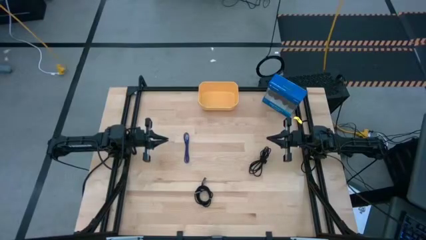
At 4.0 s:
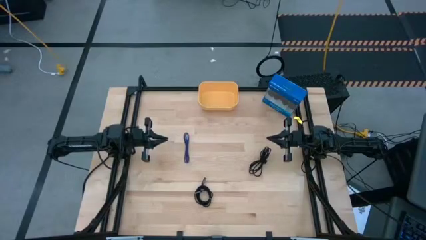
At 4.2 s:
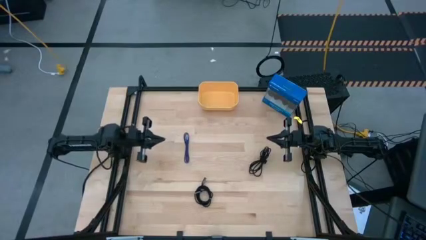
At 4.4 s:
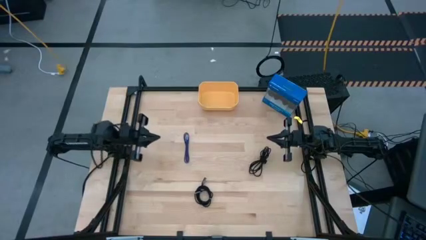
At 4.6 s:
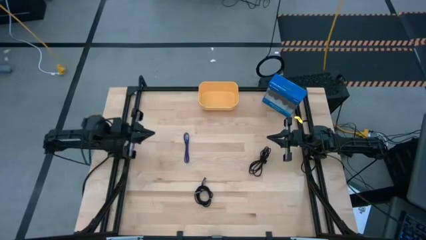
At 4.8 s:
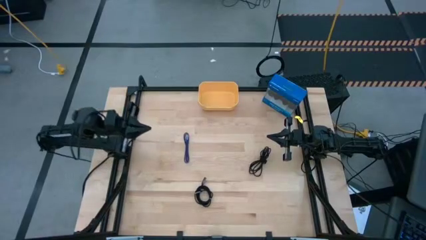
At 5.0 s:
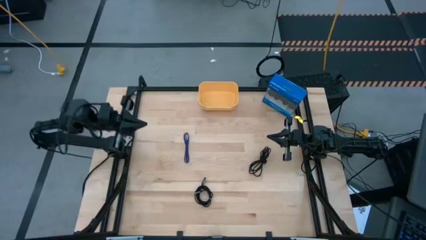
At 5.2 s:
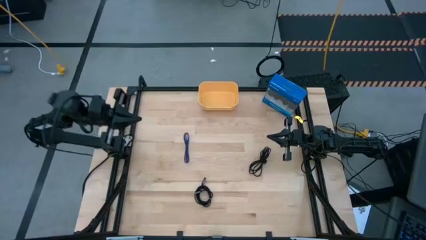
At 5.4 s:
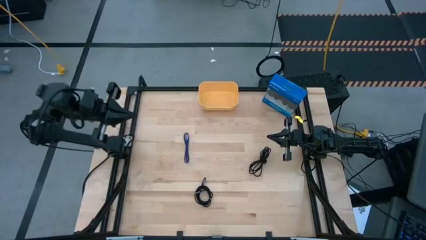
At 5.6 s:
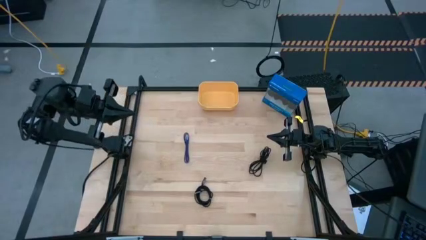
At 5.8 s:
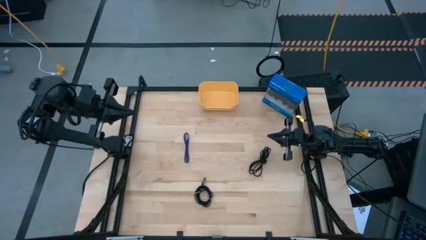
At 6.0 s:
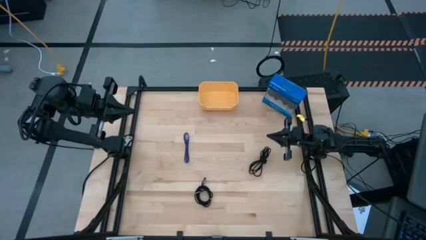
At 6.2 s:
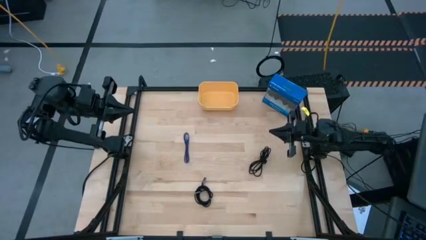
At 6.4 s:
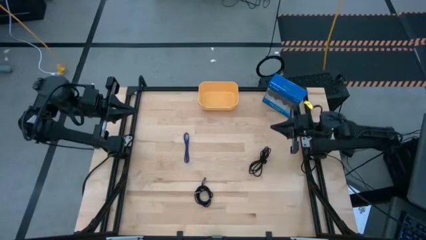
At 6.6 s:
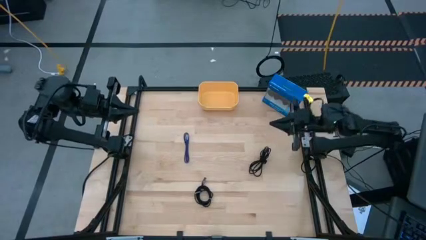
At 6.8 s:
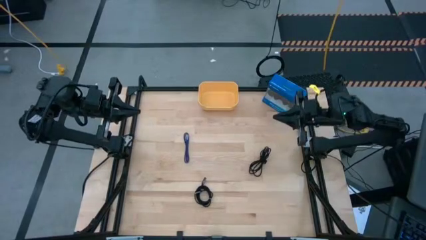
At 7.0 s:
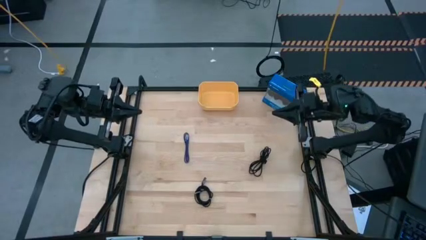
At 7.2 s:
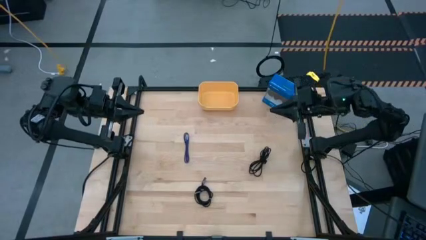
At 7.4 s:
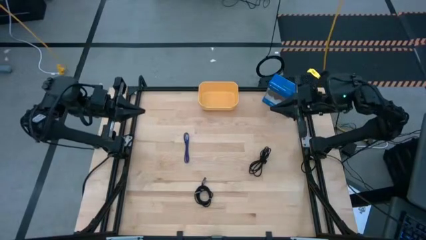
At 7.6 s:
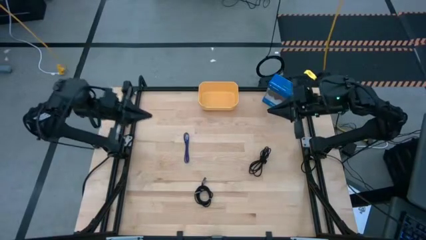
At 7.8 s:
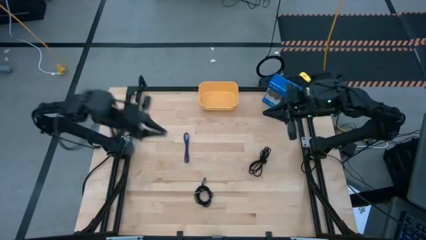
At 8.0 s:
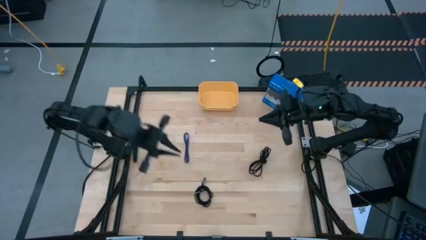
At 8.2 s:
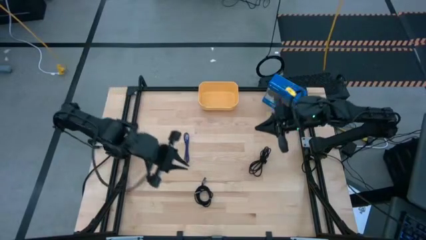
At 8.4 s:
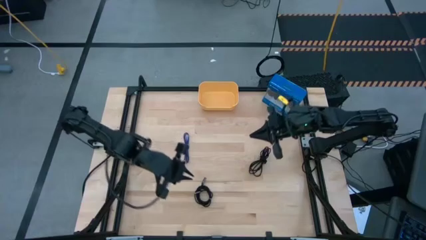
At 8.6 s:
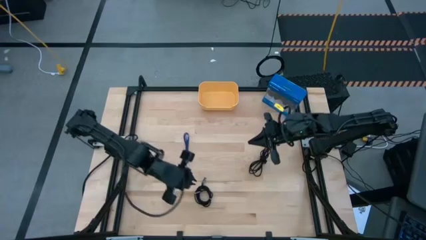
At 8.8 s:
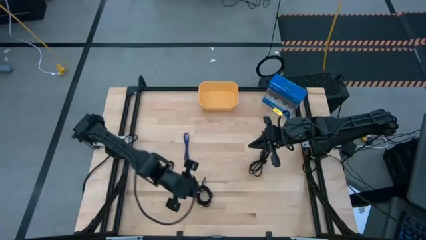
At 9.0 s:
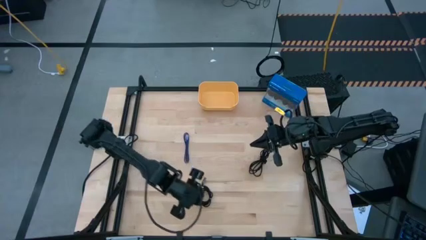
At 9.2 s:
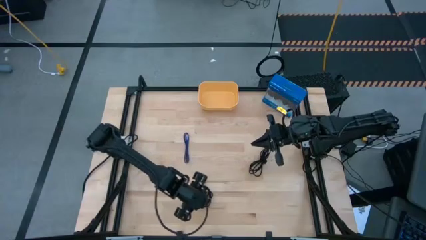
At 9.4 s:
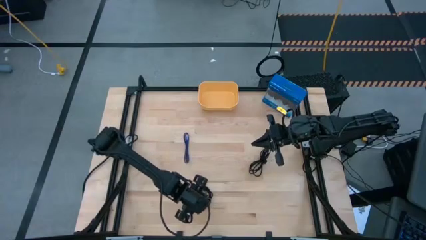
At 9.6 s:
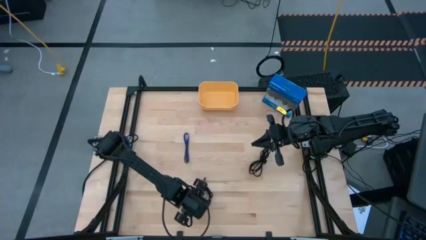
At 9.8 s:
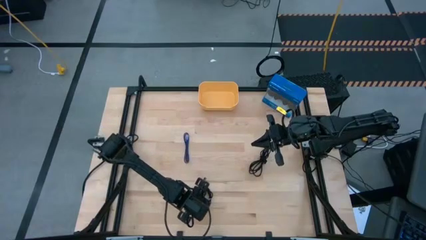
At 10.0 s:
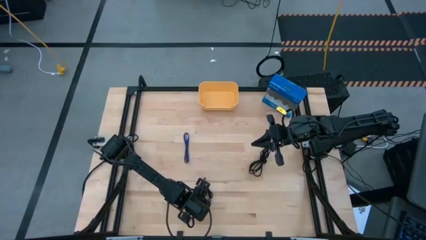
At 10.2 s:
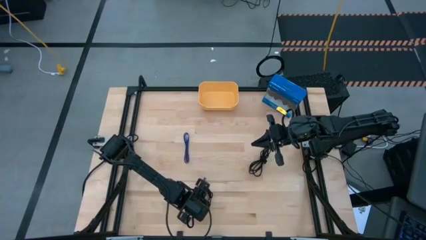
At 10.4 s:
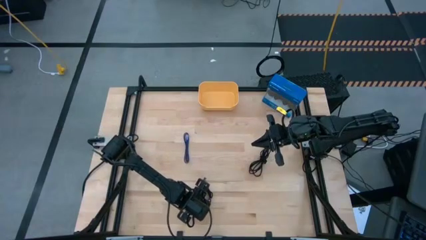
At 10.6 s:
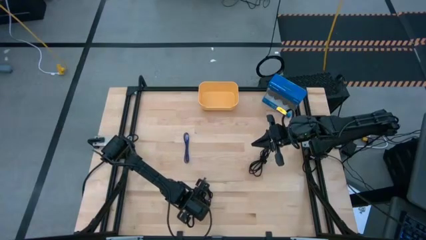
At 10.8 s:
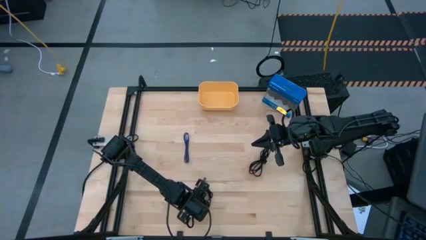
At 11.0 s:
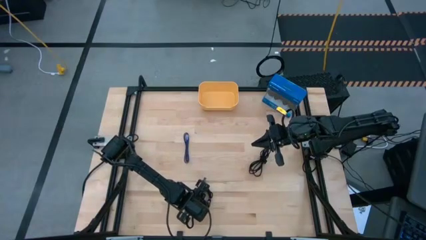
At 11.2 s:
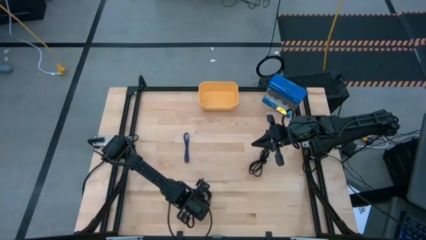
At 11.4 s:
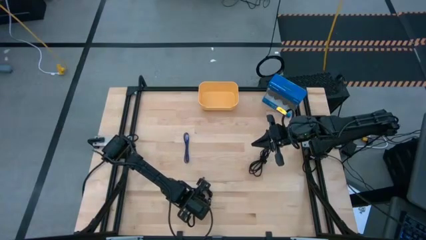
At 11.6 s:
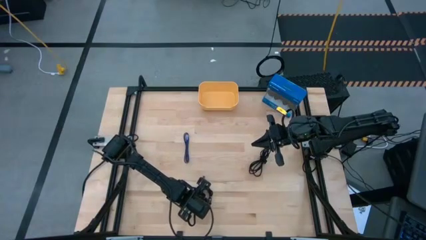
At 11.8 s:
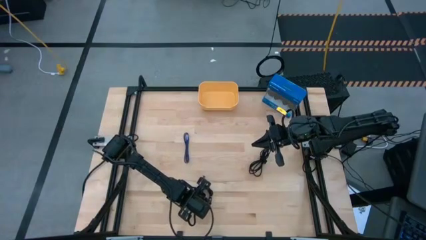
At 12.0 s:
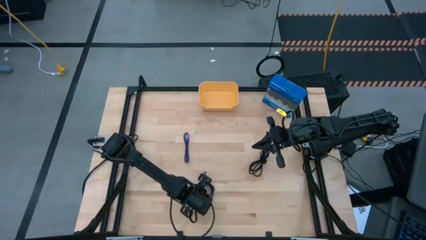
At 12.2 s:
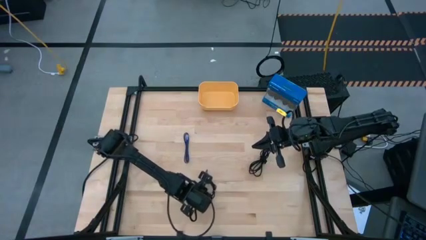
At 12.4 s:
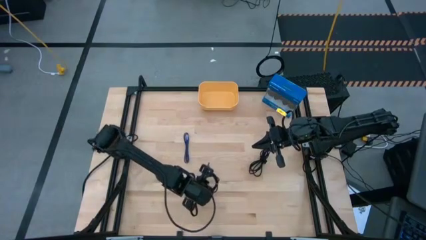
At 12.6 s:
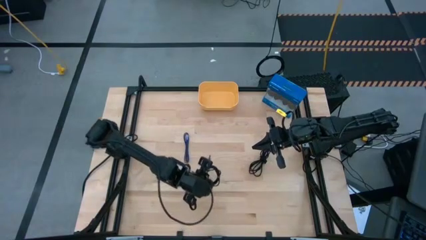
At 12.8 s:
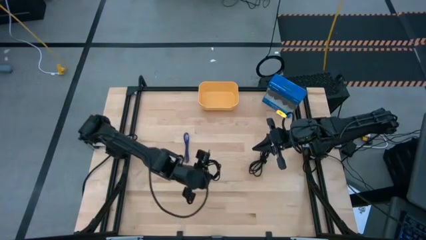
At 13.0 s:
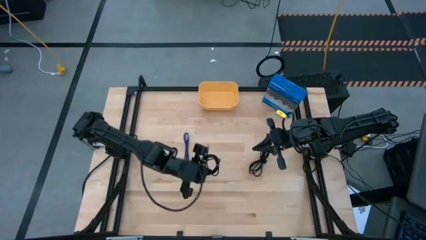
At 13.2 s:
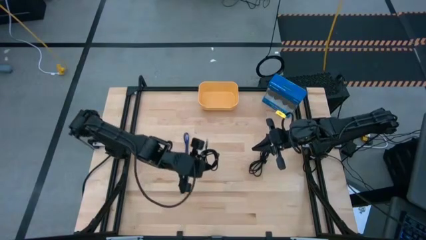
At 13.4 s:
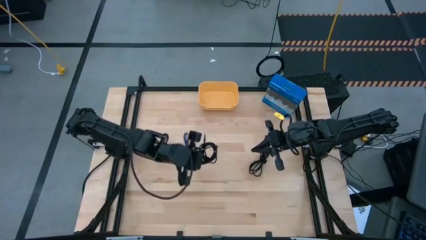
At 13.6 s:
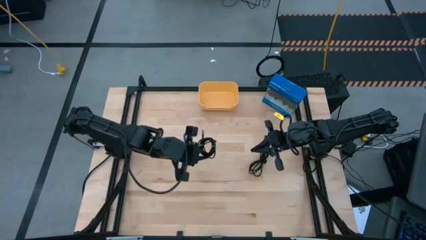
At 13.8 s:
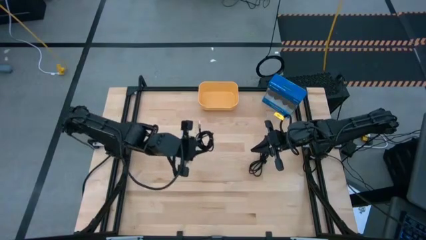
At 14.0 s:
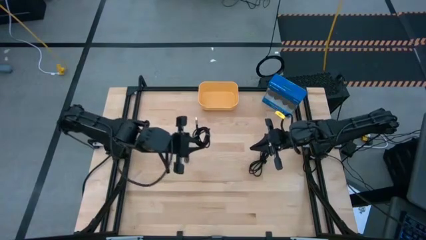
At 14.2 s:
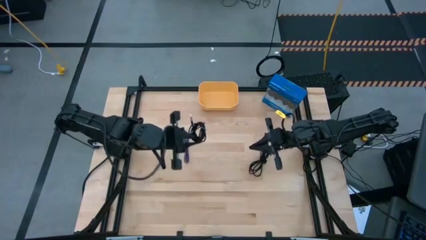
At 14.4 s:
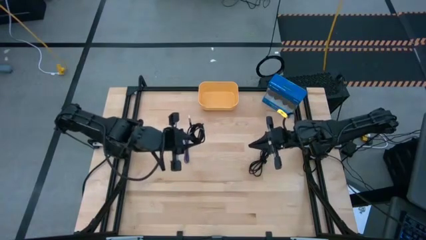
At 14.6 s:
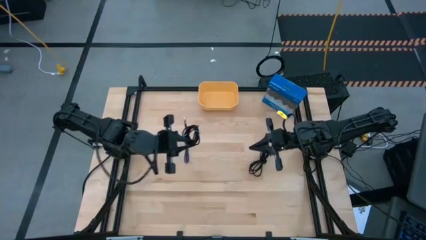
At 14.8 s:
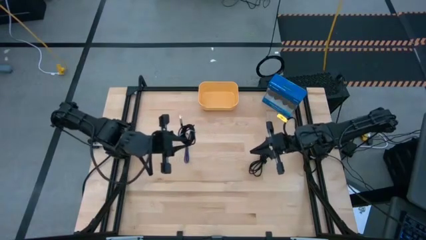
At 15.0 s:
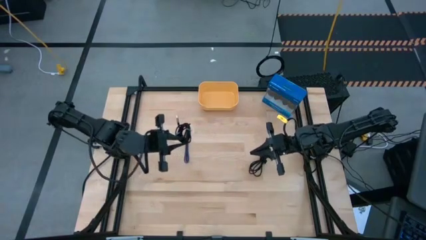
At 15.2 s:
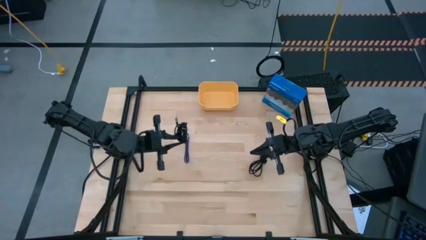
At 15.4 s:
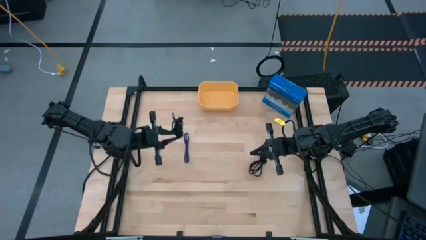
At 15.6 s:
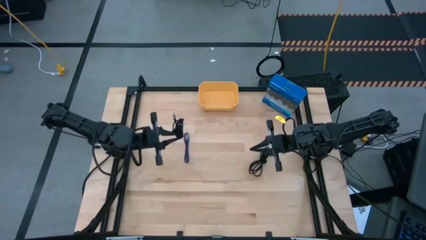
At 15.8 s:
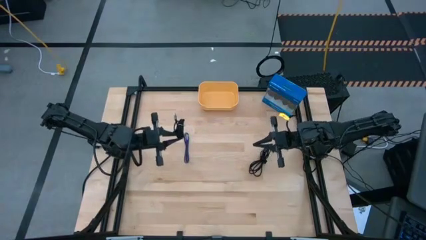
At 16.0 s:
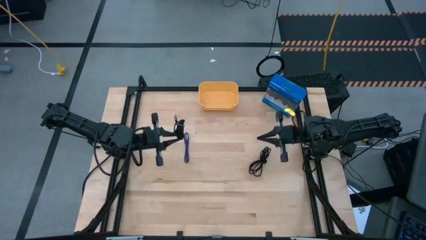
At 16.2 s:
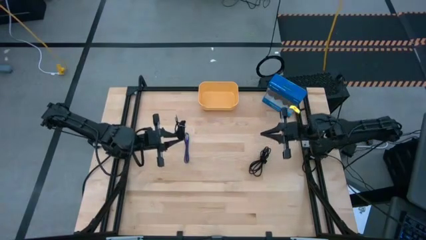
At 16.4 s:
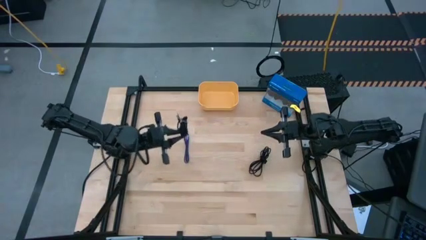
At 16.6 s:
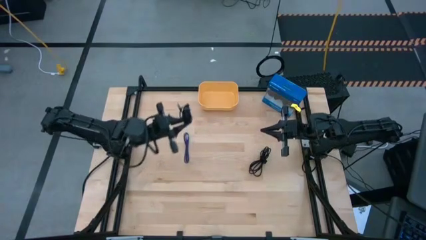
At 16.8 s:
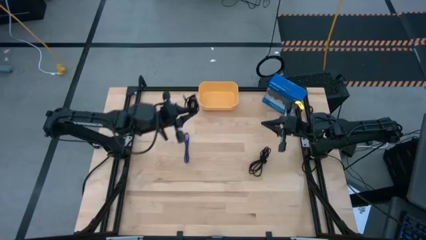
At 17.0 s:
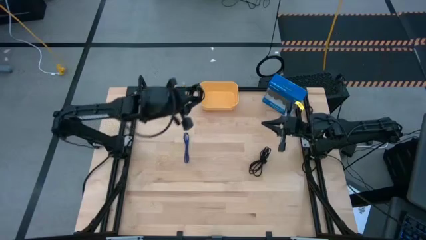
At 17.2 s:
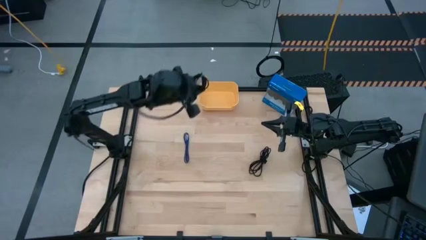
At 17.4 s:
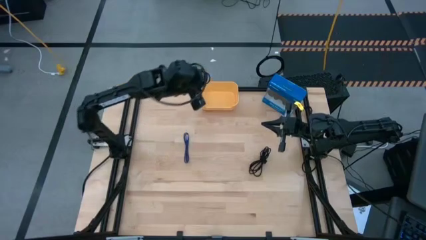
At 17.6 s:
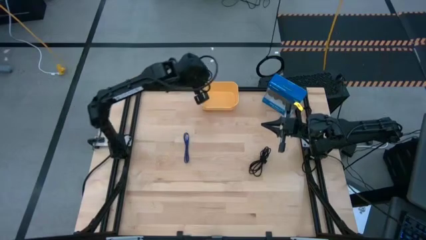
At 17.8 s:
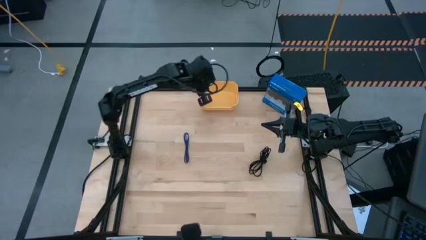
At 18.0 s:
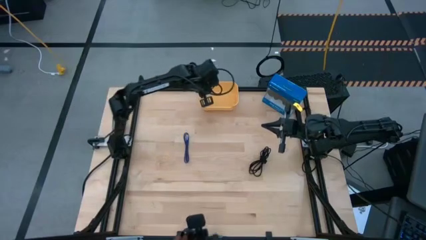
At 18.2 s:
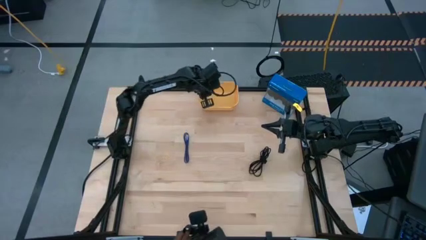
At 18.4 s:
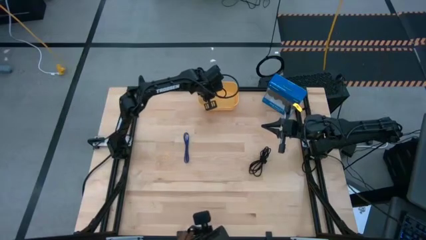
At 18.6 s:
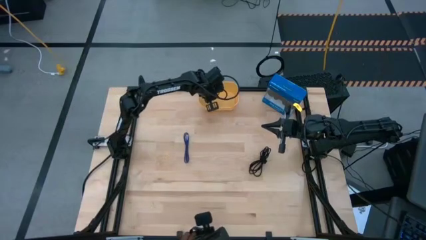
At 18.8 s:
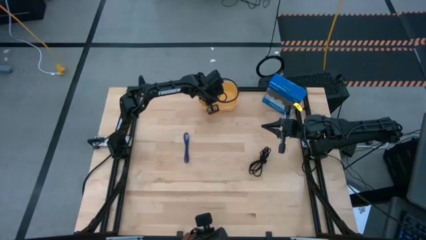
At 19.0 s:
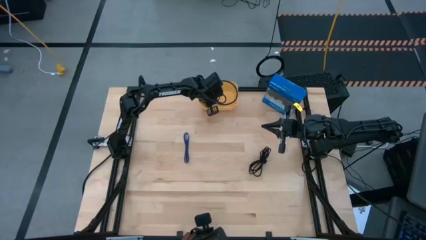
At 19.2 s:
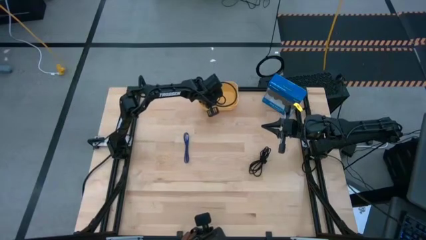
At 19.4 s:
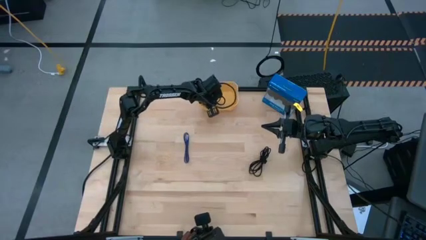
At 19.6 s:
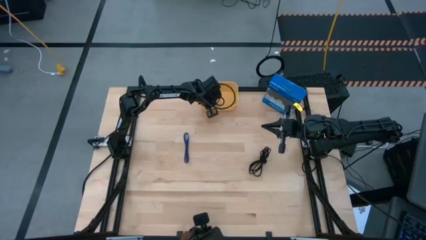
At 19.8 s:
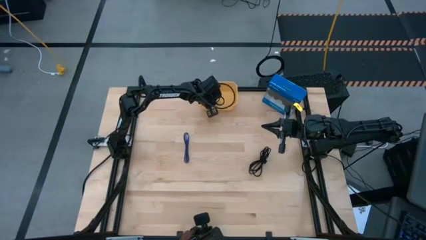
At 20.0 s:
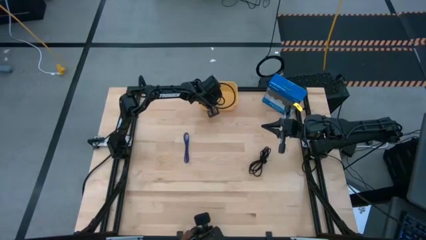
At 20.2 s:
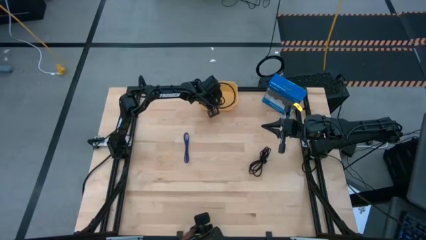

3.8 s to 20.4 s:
Task: Pick and place USB-C Cables
Put the bottom black charger cable into the yellow bin
